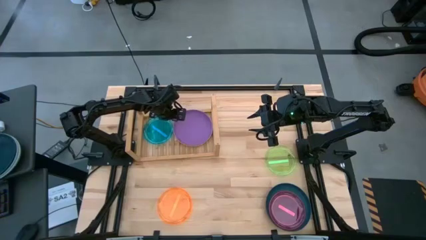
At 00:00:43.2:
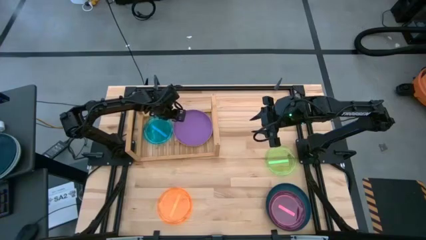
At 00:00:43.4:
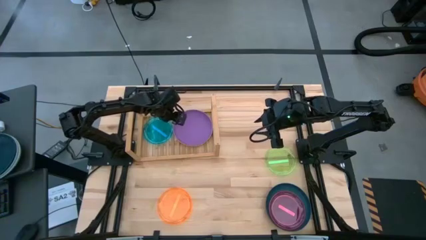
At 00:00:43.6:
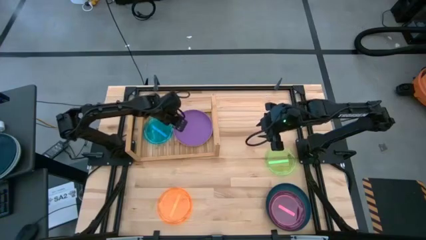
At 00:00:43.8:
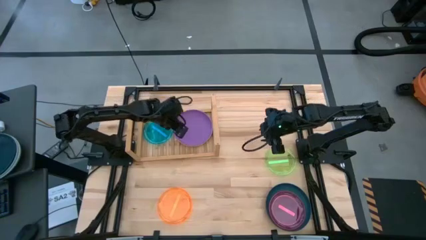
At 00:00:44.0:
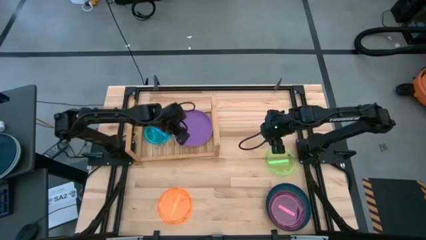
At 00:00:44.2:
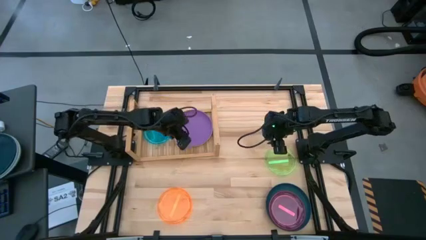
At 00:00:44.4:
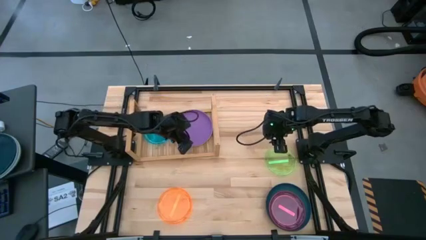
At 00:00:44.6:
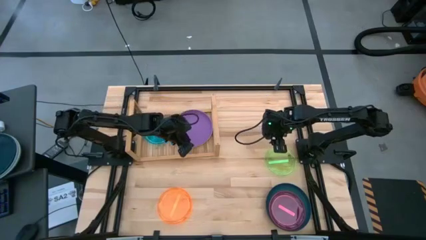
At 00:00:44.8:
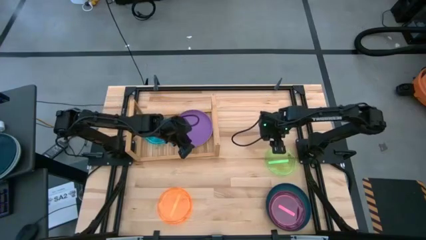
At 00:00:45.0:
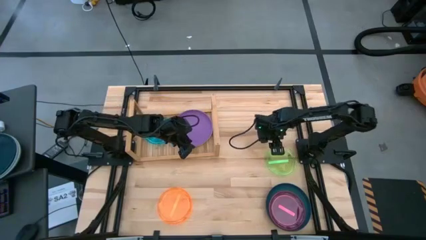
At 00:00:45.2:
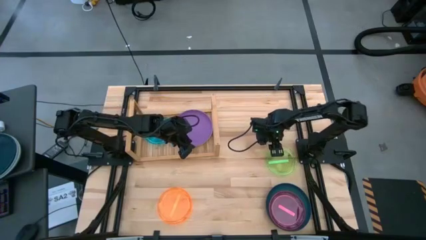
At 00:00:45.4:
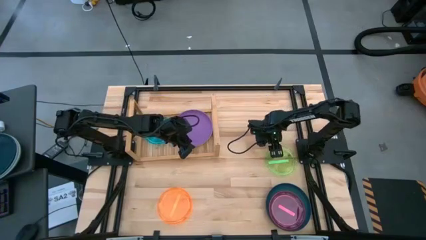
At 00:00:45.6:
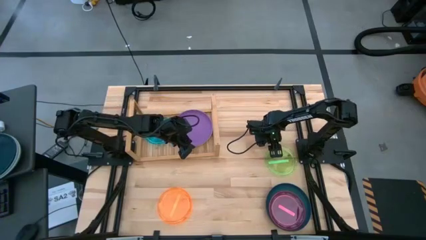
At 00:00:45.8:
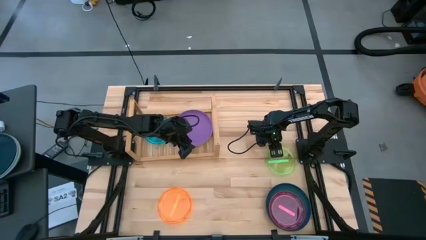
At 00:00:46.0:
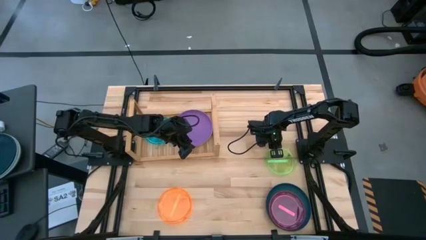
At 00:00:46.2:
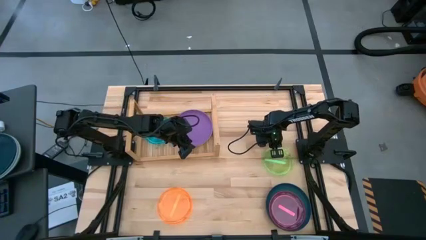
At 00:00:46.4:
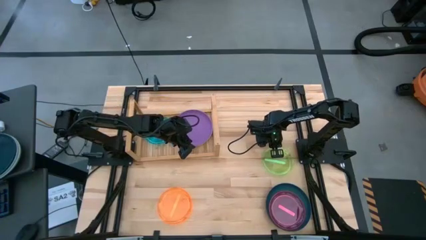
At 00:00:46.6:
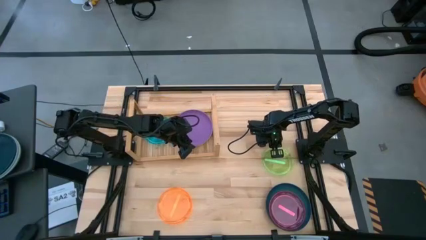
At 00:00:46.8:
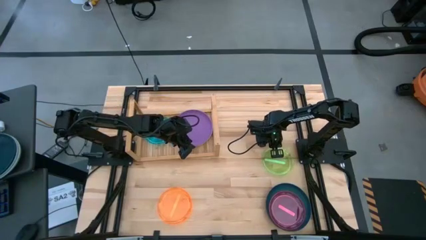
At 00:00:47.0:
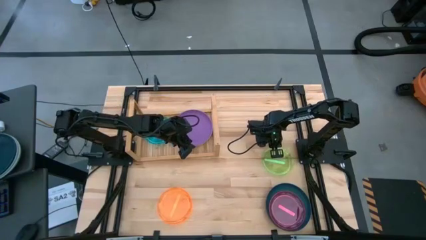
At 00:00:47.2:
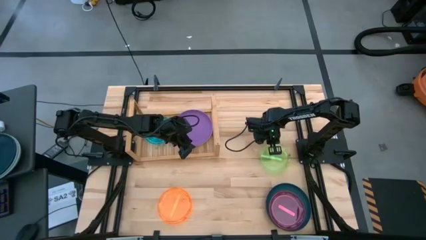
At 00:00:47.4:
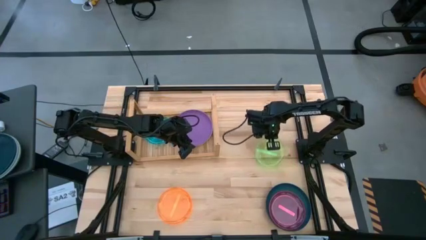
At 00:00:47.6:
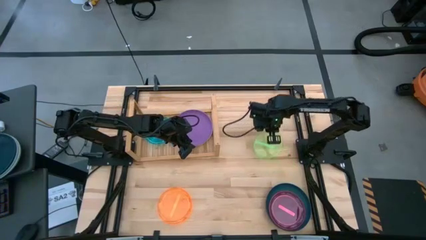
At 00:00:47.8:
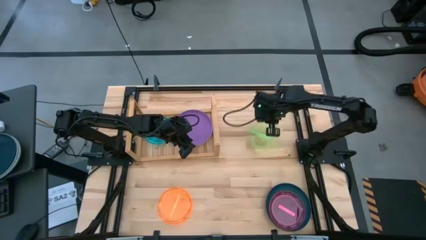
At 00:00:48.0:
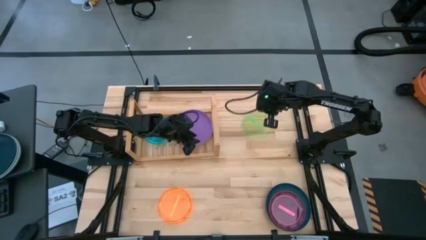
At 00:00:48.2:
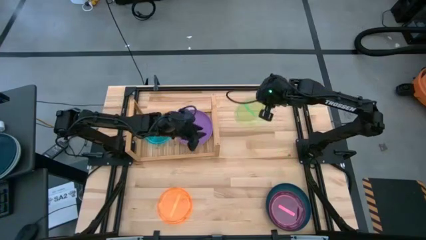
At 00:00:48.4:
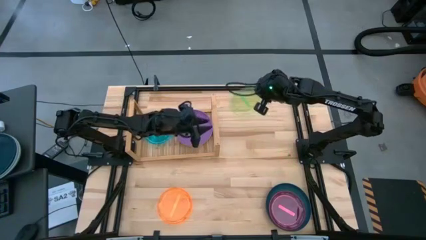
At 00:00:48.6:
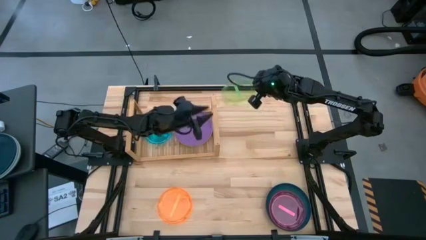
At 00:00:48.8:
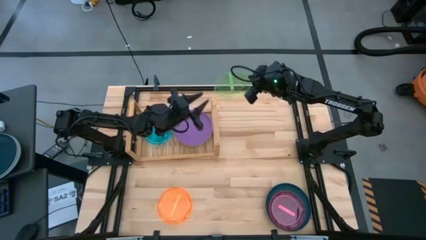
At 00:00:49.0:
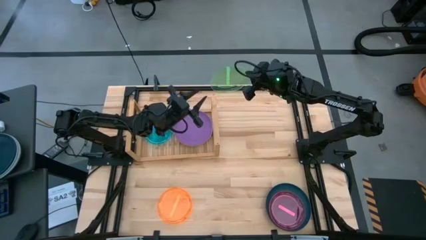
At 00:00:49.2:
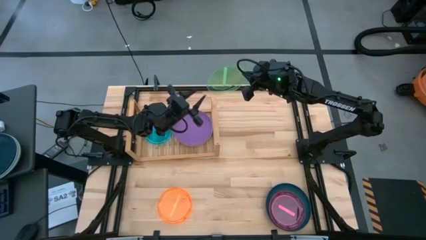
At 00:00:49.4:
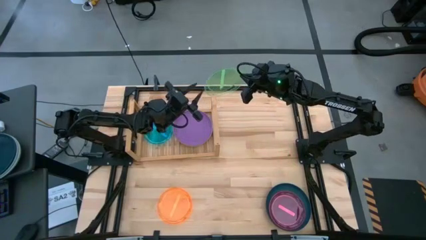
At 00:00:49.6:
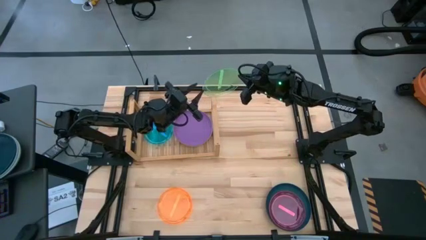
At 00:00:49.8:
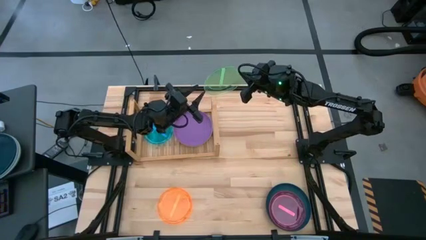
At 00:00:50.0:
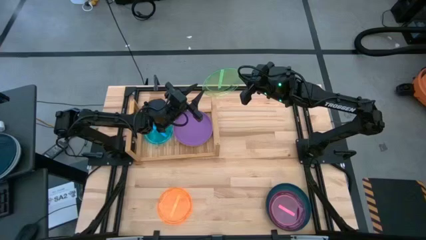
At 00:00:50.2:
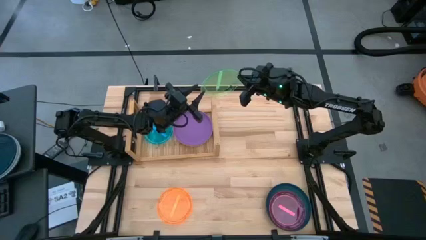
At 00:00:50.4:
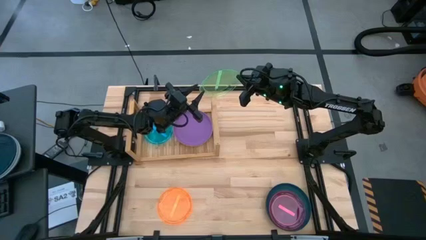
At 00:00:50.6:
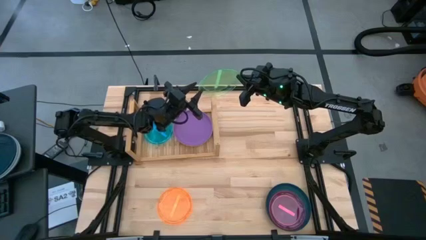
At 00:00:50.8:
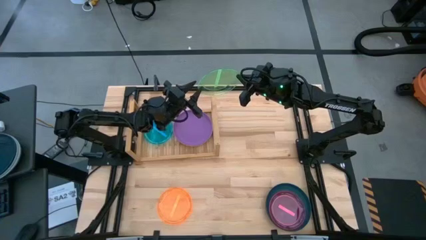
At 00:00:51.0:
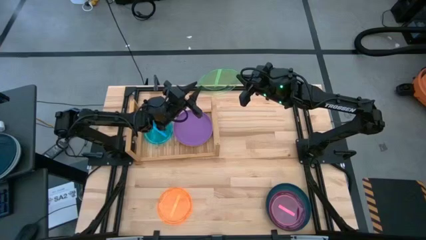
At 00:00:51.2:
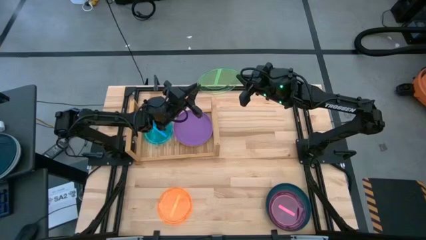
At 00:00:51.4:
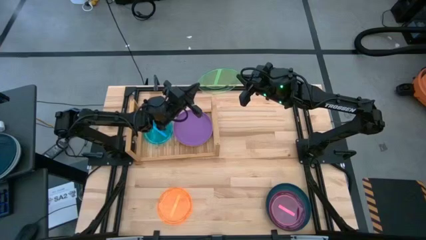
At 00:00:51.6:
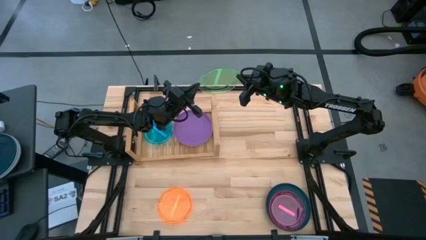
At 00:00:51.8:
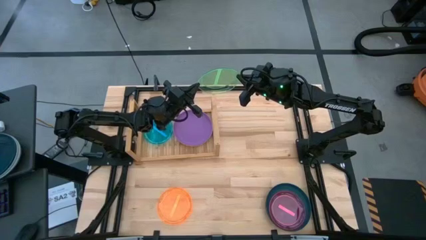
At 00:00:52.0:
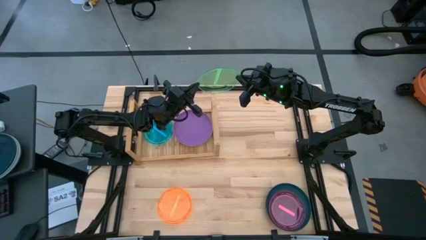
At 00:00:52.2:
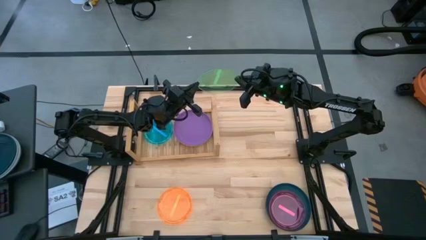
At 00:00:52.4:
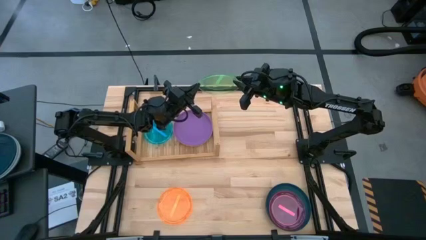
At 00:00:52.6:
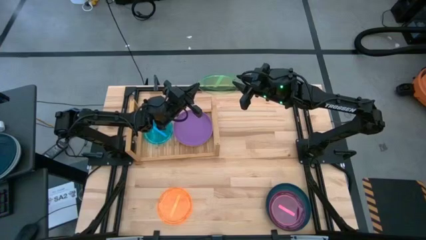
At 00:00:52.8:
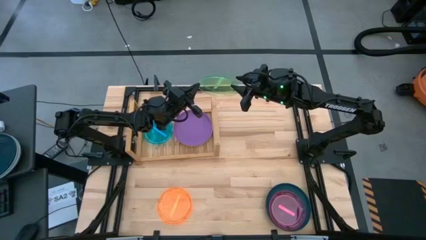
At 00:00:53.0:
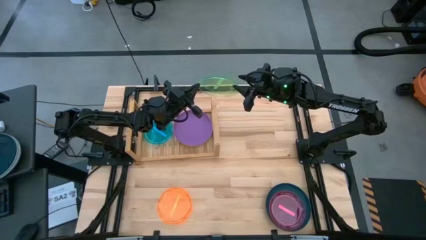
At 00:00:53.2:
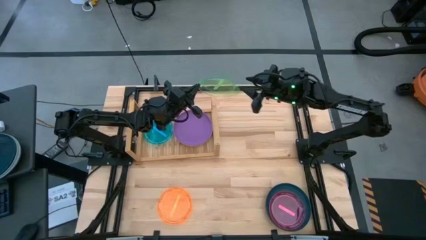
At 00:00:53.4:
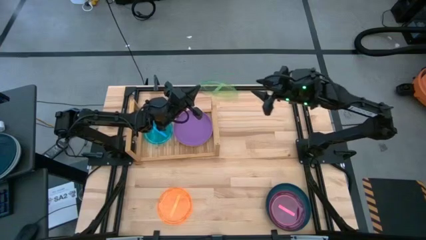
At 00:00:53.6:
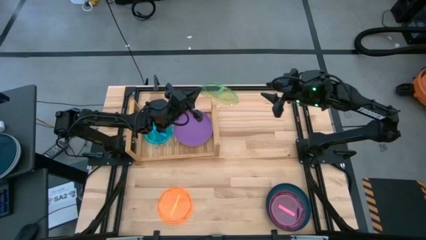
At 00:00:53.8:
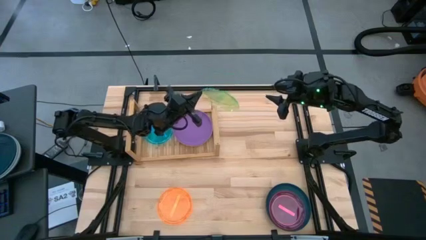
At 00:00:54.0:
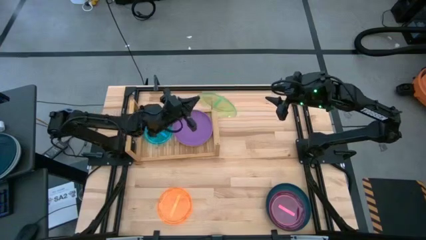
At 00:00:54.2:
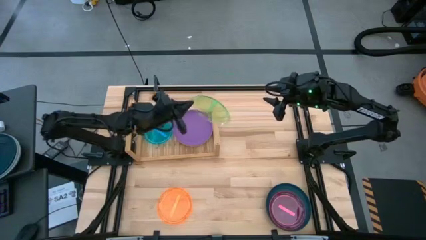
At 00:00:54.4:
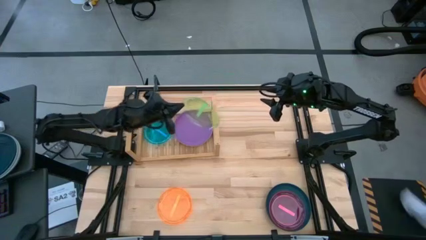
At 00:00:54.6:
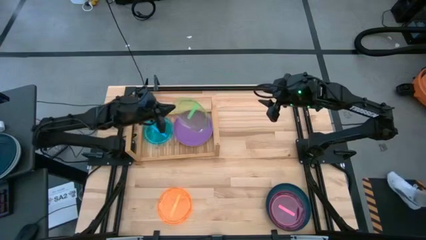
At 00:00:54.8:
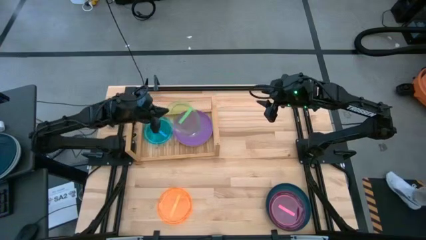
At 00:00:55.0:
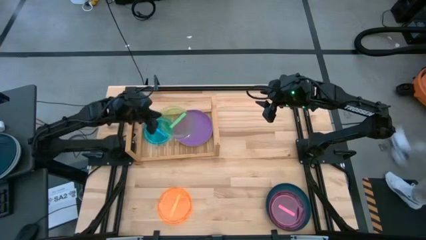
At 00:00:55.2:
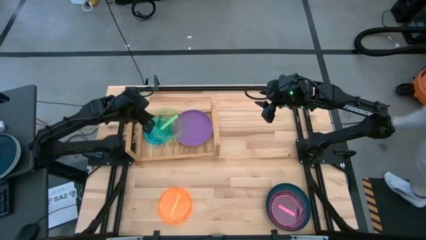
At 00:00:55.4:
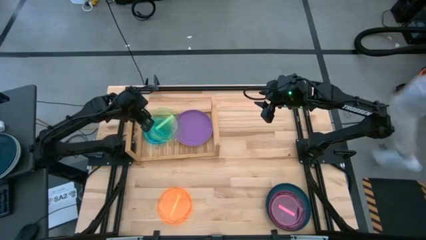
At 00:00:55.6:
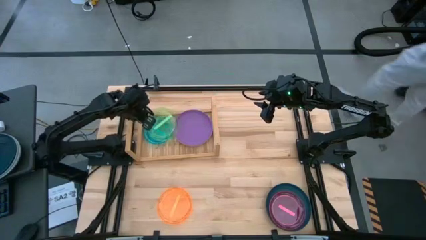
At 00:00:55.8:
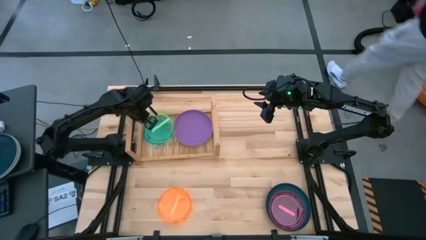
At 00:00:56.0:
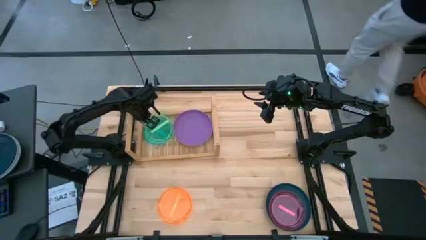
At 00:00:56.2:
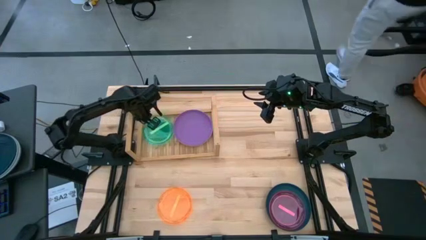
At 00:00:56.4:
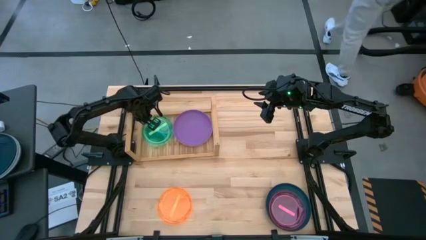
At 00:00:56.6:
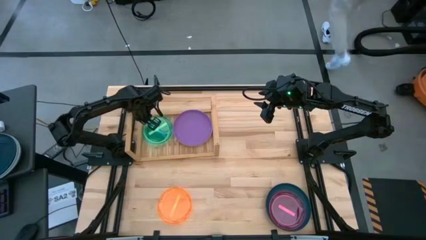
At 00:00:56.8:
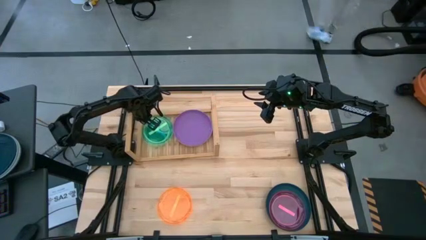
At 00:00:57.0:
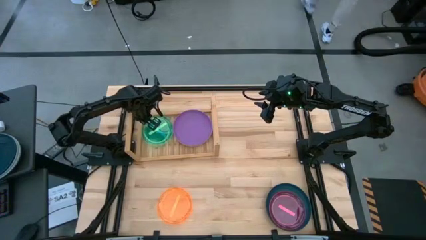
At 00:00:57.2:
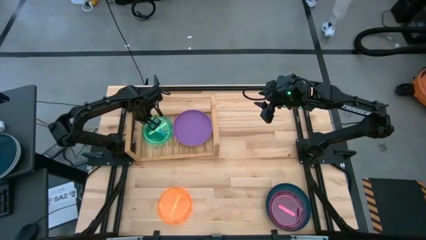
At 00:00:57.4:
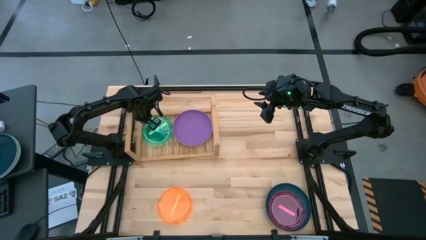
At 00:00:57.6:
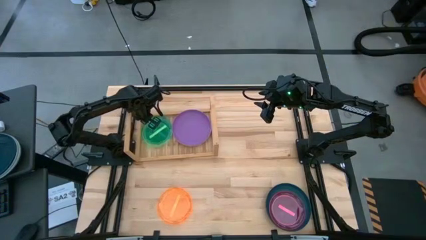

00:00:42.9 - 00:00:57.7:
Task: Place and stack plates onto a shelf
Stack the green plate on top of the blue plate on the shelf
